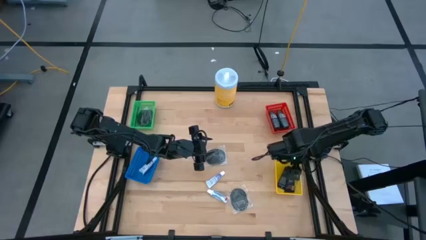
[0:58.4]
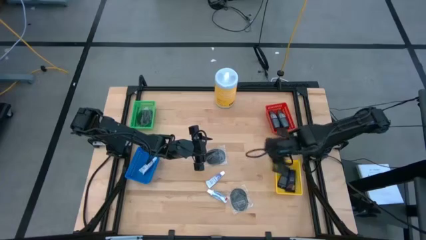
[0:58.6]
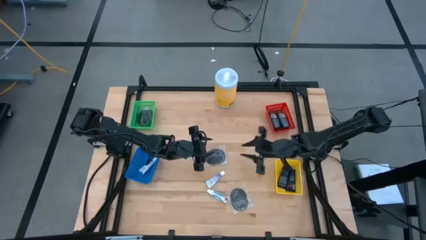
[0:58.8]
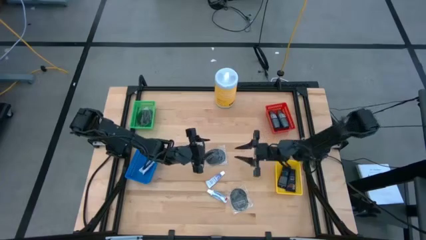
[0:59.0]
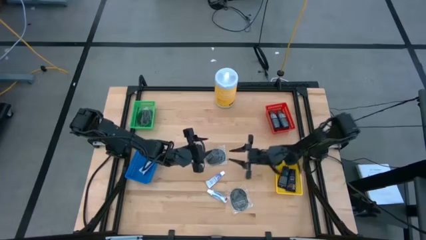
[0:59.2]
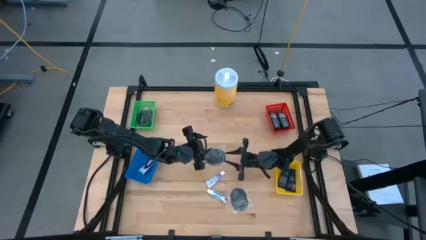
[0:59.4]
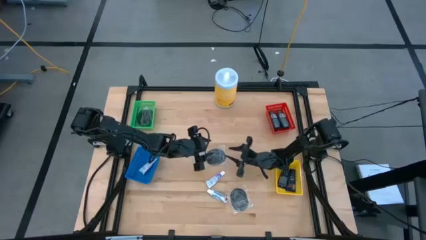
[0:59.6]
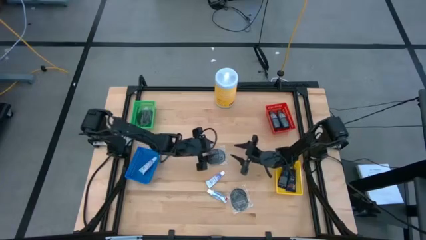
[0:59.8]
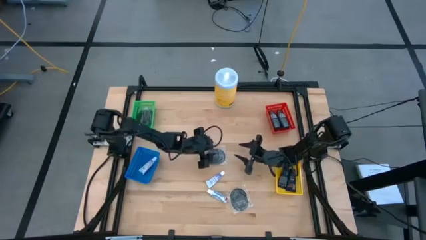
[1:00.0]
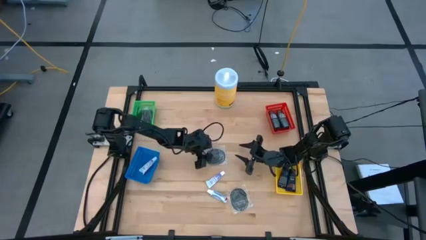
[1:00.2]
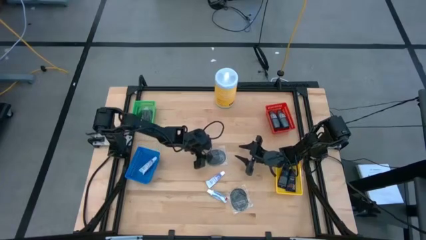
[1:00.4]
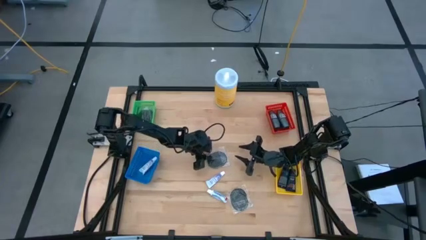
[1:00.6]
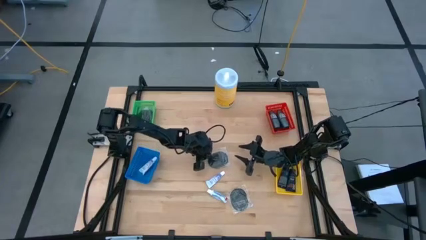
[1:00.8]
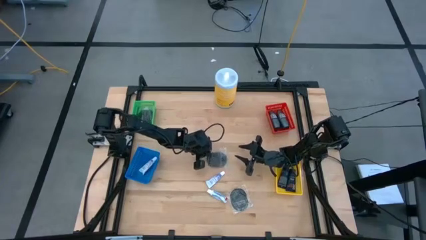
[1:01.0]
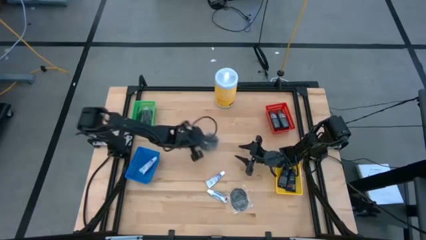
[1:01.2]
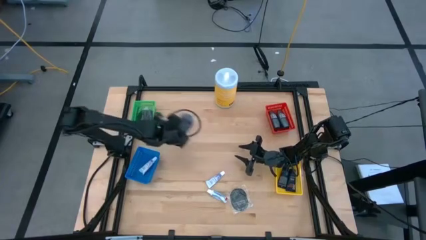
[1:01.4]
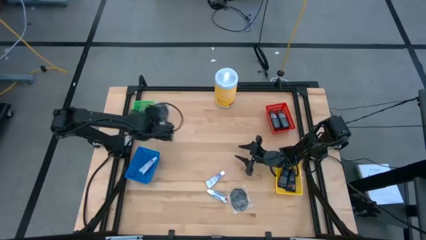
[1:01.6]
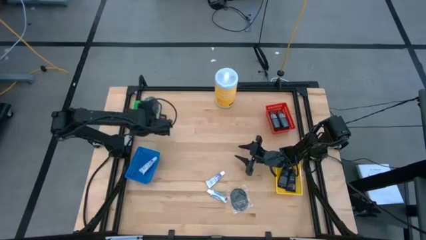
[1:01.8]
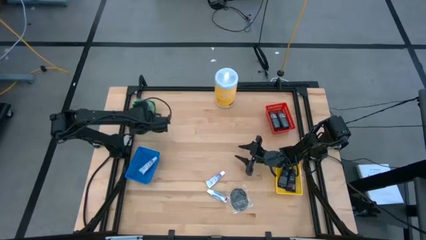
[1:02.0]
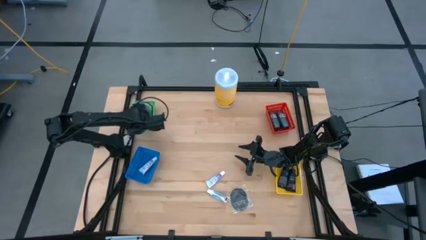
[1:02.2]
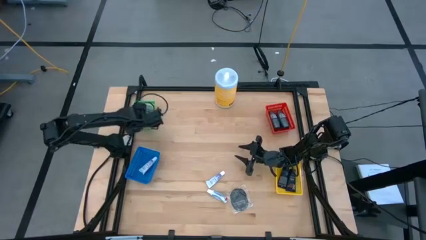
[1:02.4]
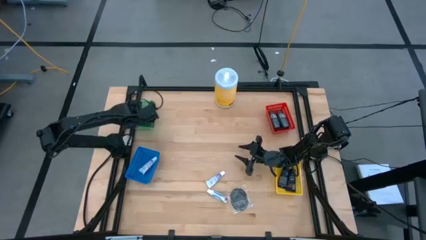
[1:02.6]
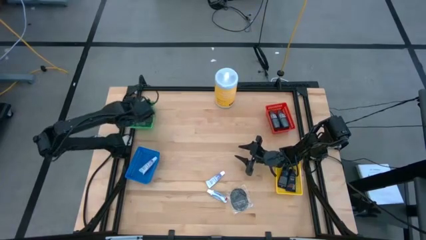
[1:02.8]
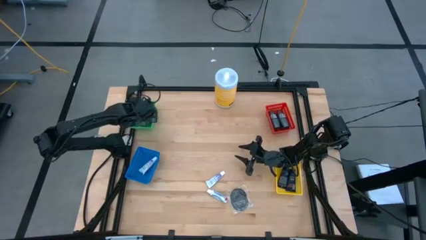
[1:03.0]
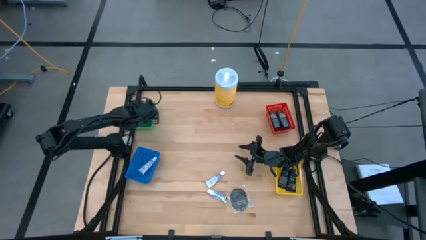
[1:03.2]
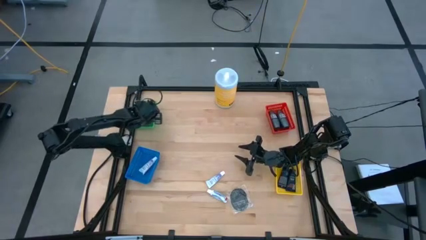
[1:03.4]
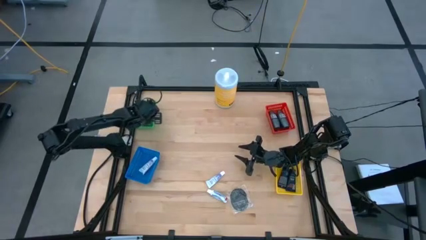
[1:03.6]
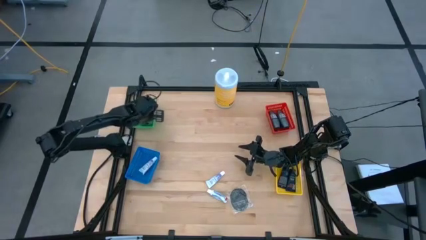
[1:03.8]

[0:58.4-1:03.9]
Task: Pick & Place Travel size toiletries
Put the hairbrush into the green bin

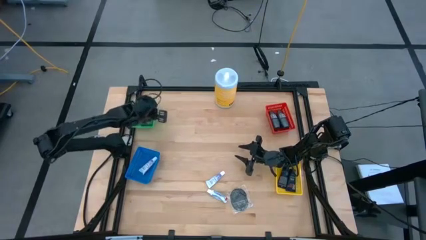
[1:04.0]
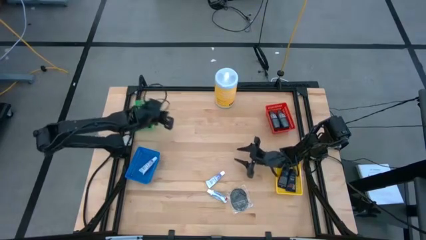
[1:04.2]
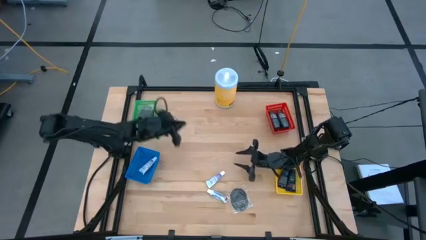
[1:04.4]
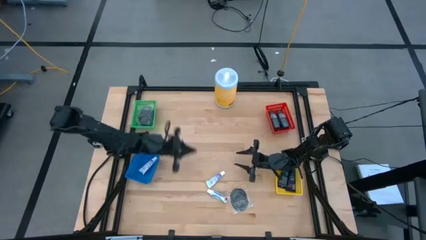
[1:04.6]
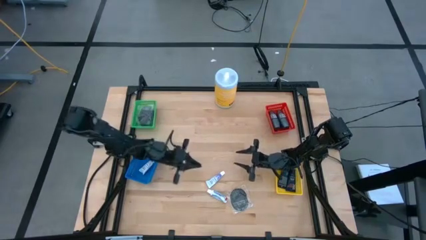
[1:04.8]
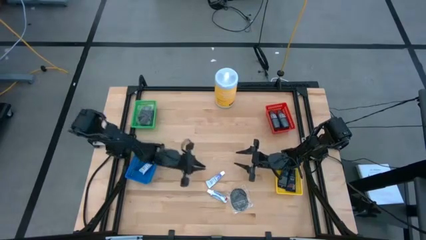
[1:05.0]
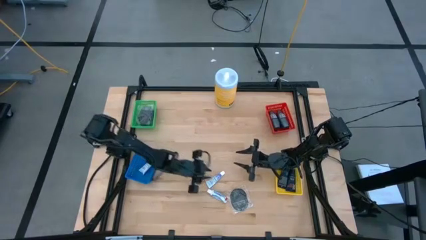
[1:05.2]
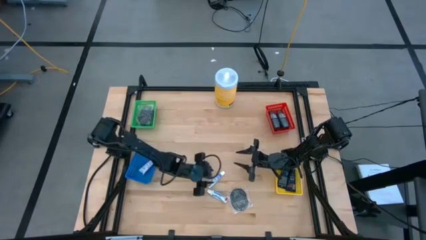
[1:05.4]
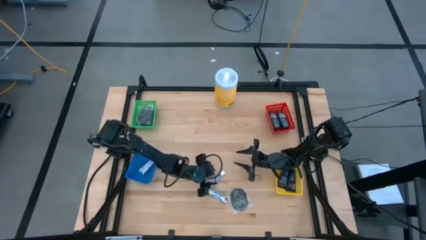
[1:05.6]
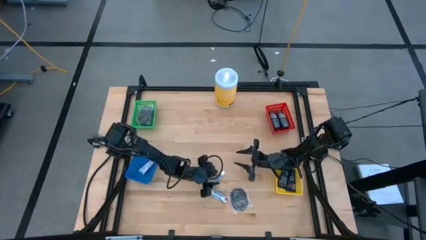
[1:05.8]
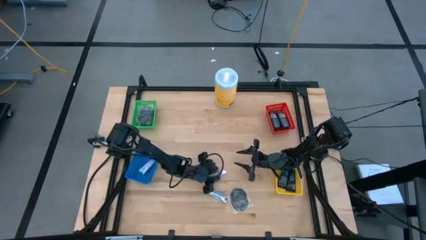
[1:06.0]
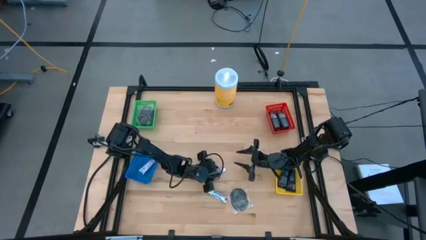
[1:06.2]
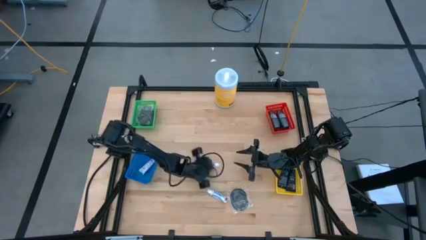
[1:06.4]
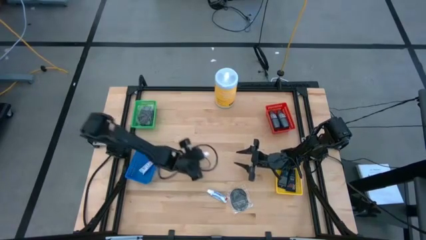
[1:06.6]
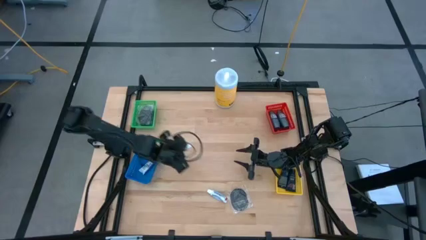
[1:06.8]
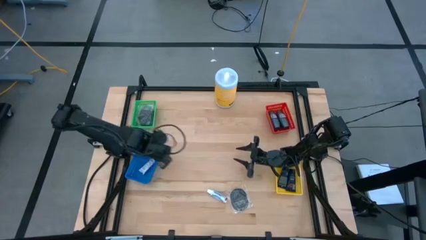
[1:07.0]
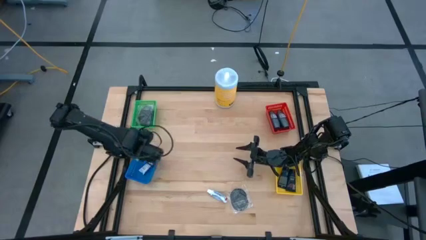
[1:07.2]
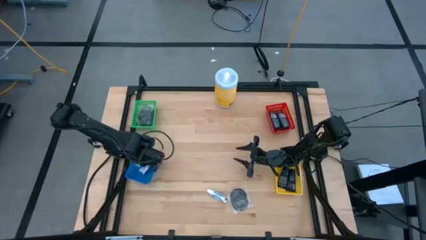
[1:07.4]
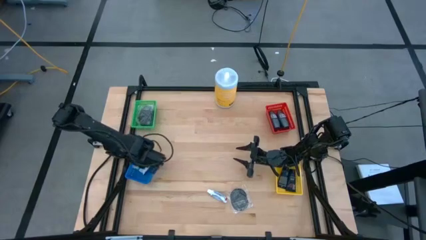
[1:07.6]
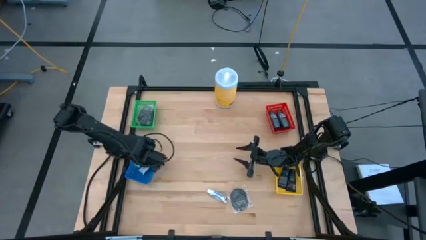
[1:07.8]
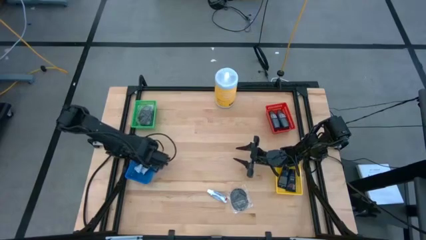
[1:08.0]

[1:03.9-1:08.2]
Put the toothpaste into the blue bin

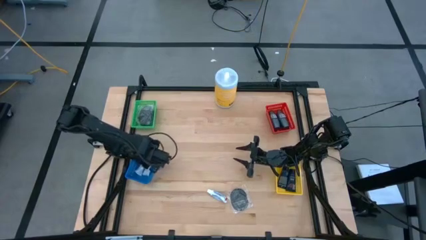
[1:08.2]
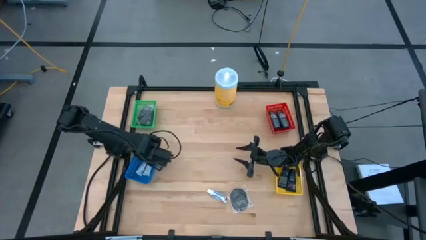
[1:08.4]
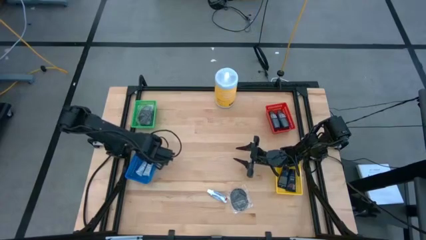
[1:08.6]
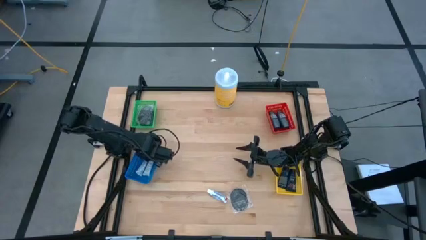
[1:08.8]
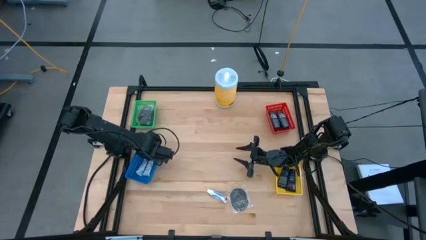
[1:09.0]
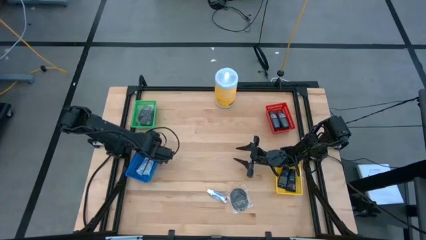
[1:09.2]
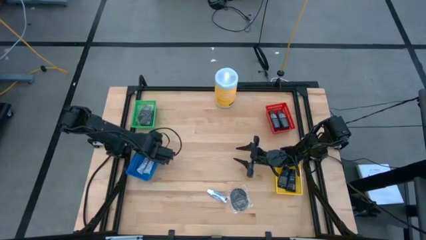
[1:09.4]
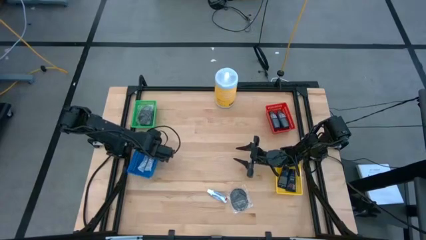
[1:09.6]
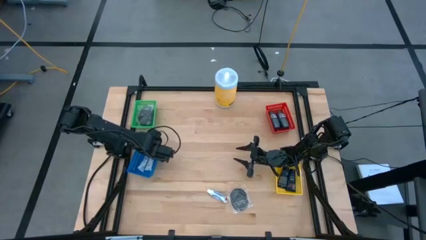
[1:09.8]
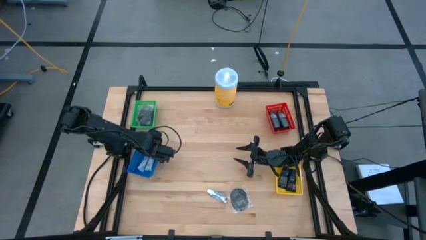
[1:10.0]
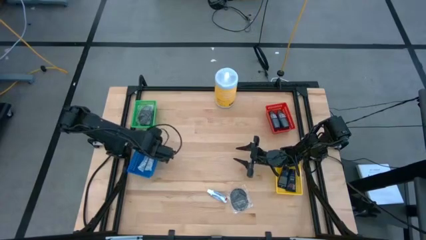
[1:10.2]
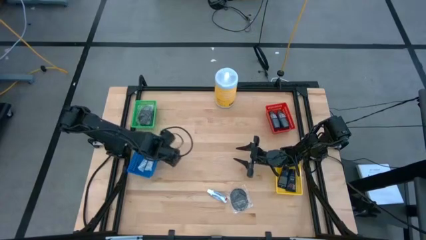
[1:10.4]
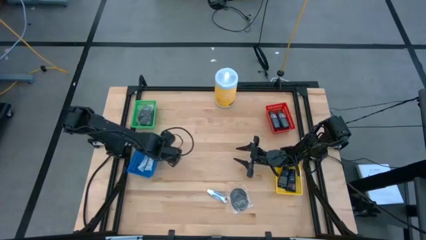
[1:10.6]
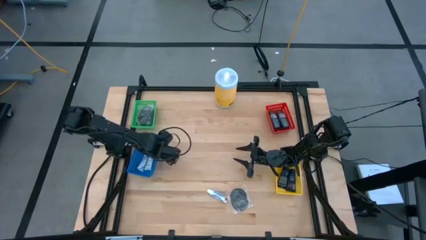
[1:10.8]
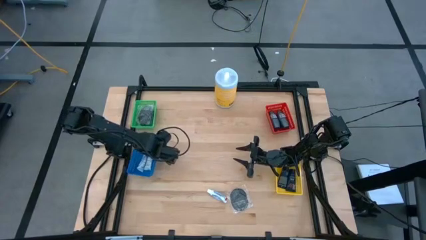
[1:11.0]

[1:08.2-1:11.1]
Adjust the blue bin
